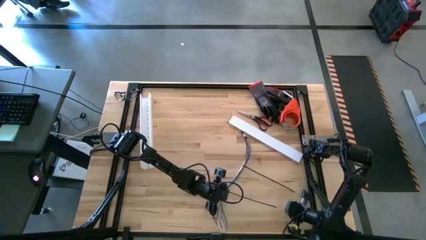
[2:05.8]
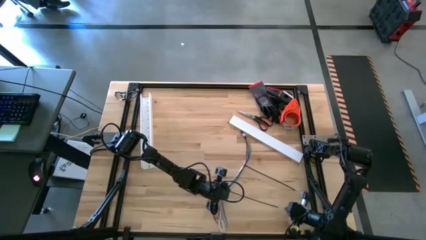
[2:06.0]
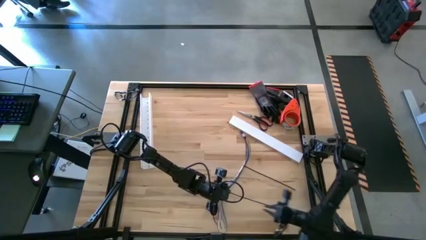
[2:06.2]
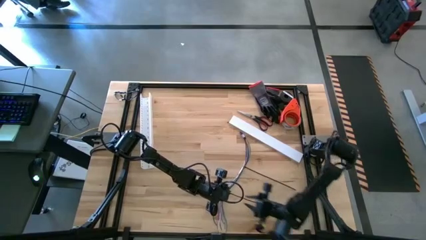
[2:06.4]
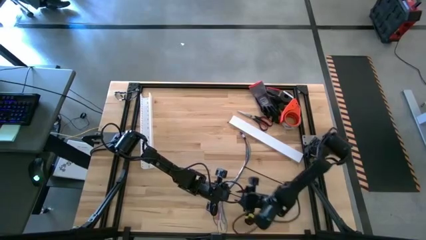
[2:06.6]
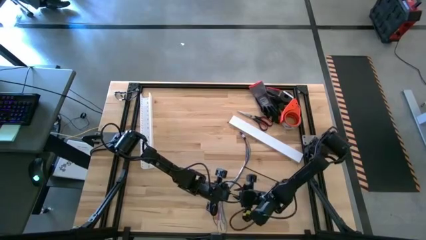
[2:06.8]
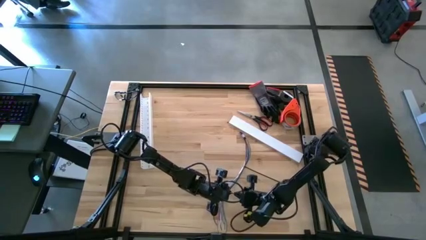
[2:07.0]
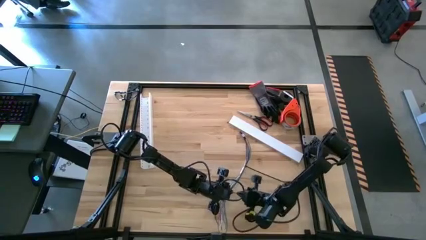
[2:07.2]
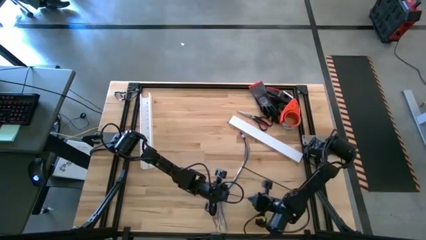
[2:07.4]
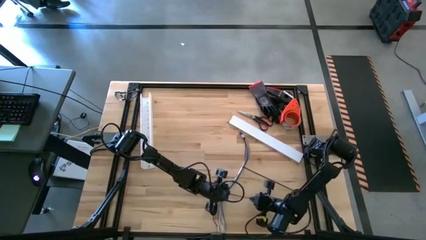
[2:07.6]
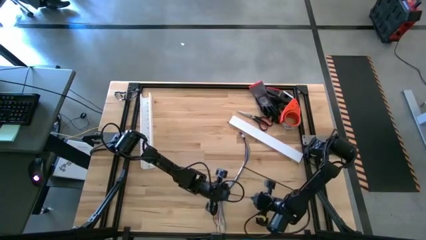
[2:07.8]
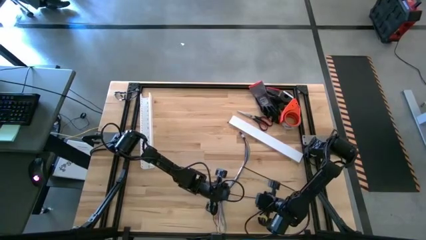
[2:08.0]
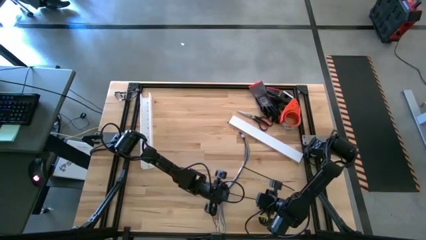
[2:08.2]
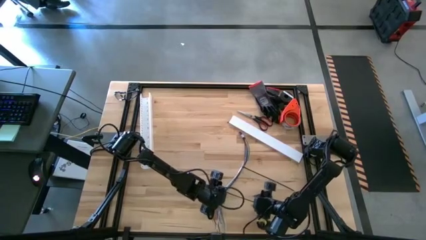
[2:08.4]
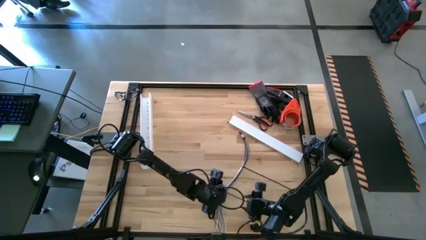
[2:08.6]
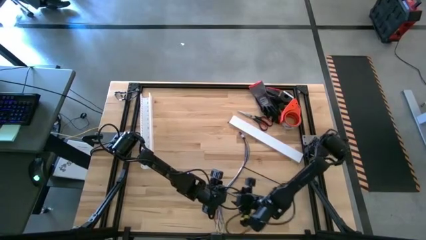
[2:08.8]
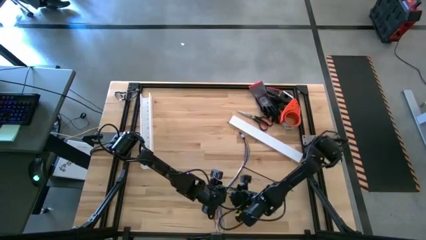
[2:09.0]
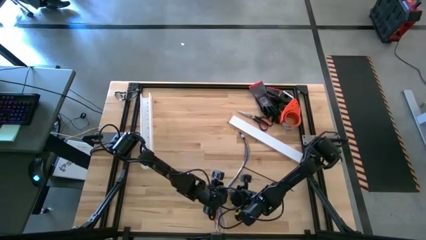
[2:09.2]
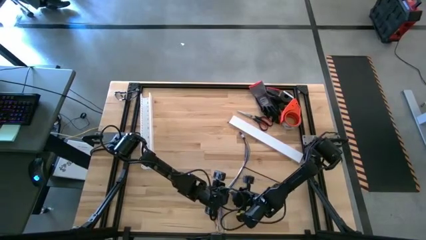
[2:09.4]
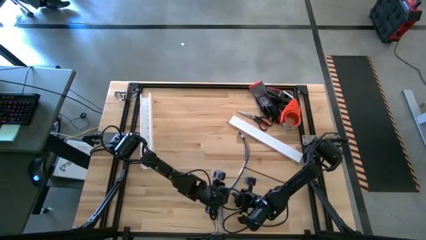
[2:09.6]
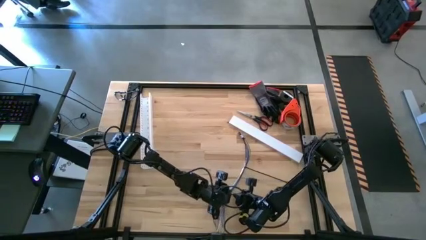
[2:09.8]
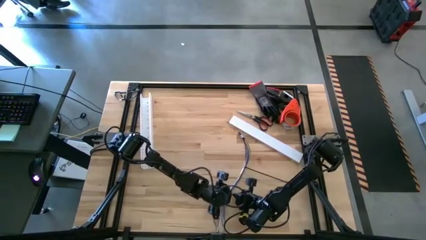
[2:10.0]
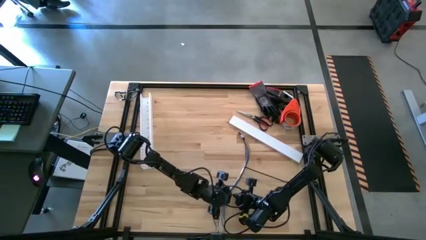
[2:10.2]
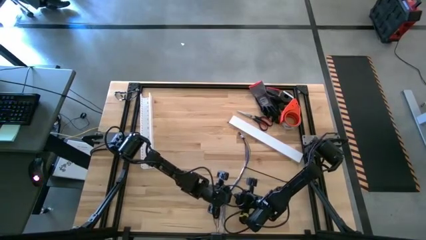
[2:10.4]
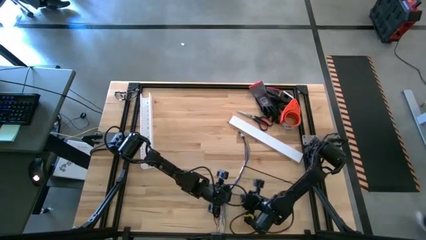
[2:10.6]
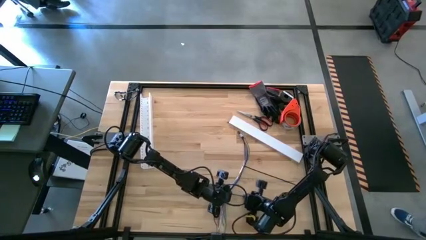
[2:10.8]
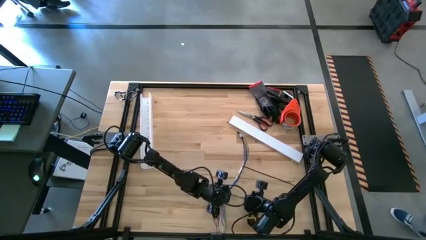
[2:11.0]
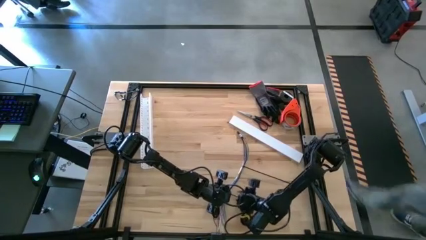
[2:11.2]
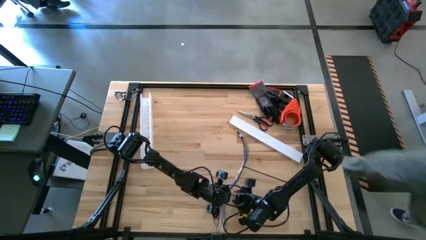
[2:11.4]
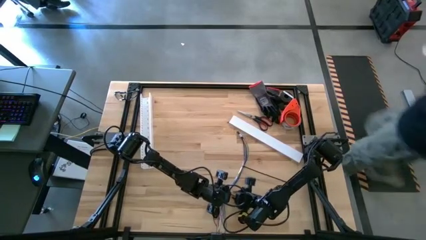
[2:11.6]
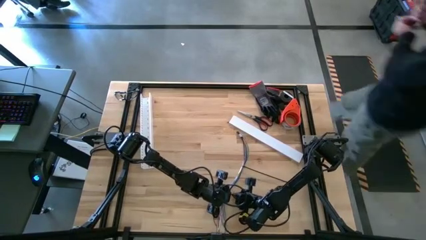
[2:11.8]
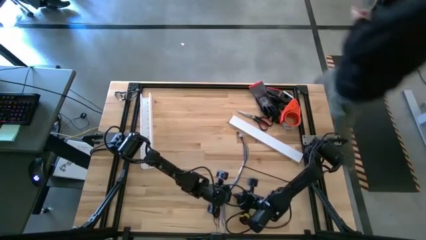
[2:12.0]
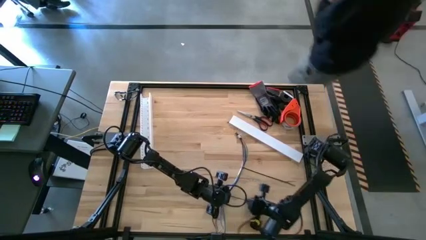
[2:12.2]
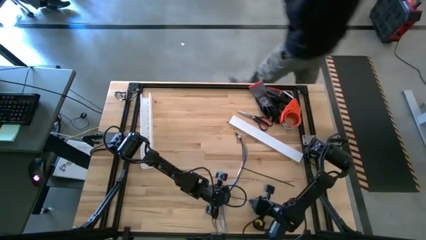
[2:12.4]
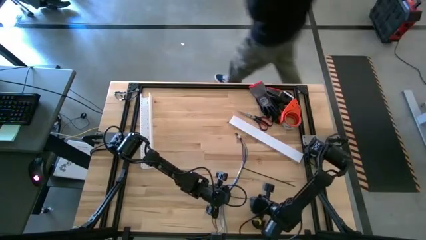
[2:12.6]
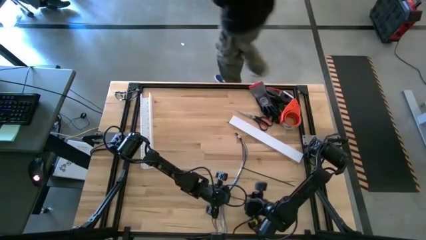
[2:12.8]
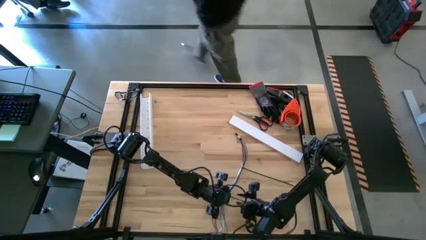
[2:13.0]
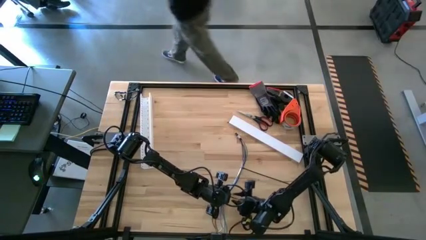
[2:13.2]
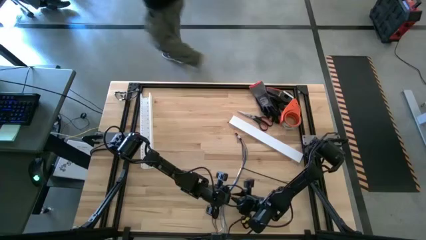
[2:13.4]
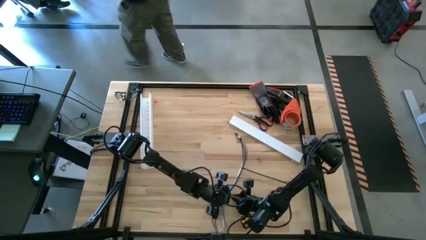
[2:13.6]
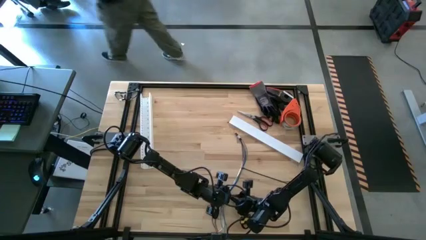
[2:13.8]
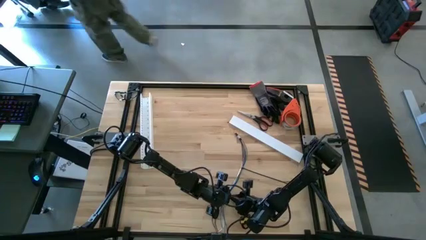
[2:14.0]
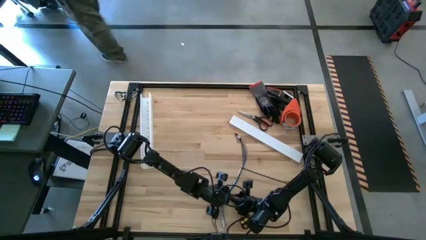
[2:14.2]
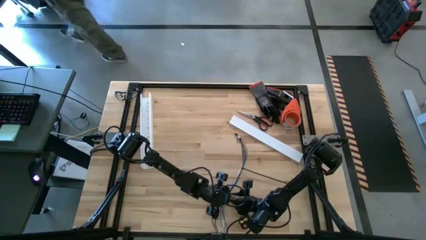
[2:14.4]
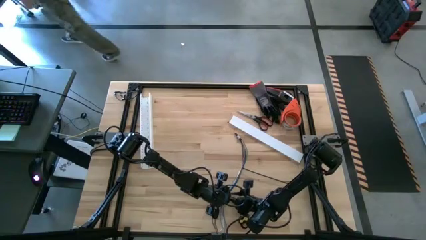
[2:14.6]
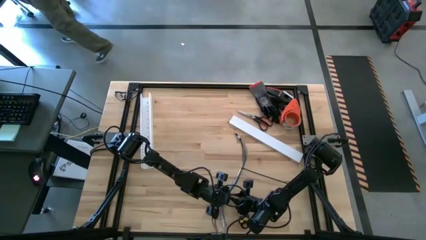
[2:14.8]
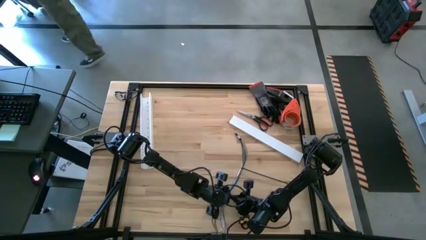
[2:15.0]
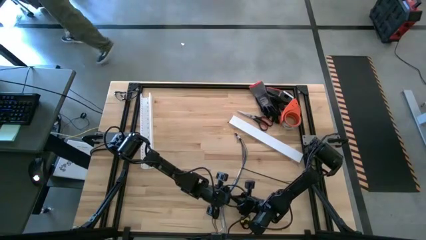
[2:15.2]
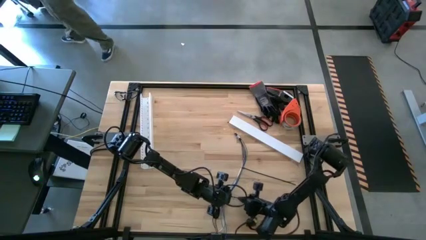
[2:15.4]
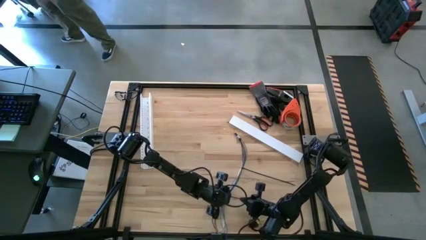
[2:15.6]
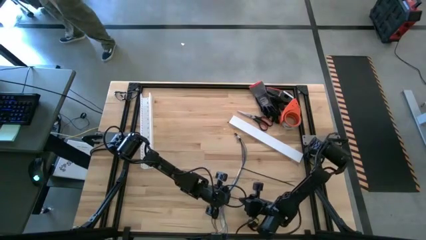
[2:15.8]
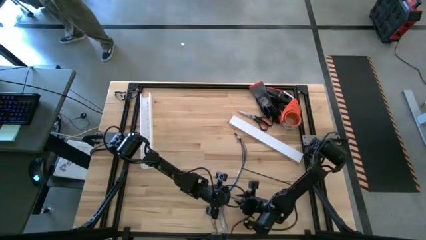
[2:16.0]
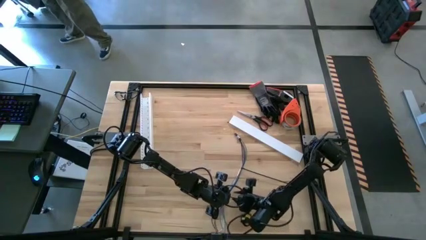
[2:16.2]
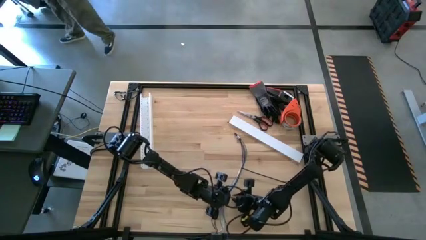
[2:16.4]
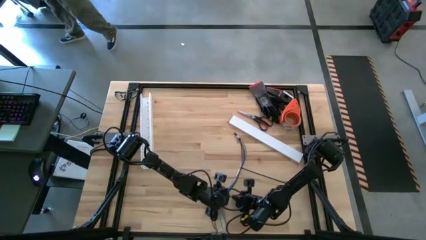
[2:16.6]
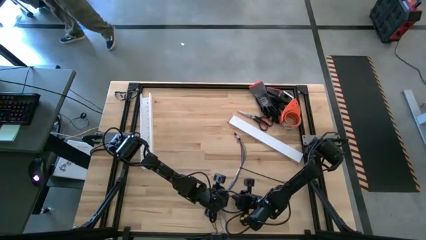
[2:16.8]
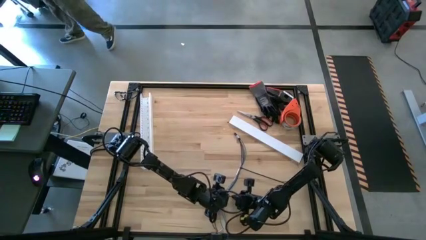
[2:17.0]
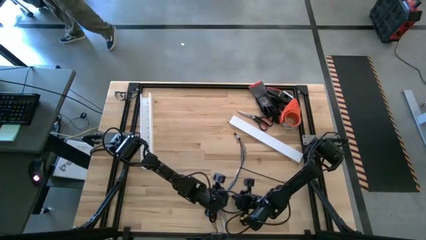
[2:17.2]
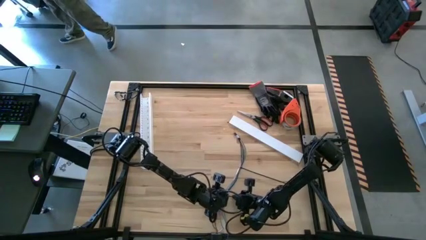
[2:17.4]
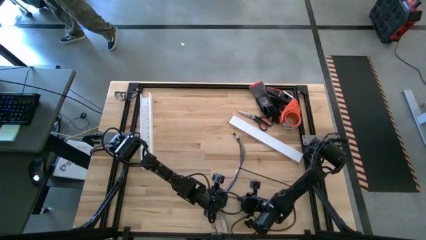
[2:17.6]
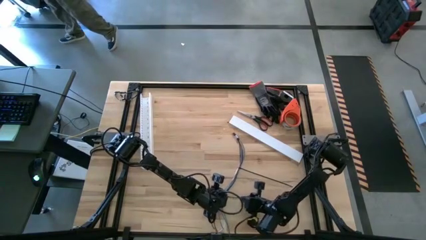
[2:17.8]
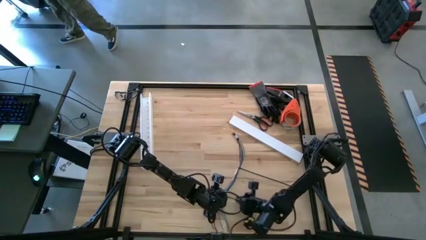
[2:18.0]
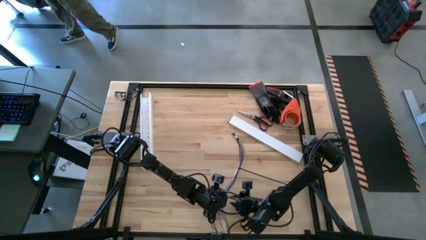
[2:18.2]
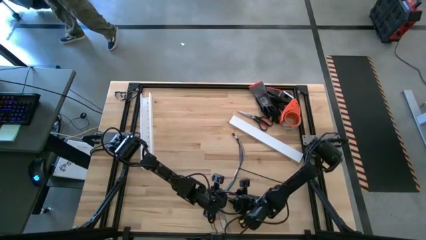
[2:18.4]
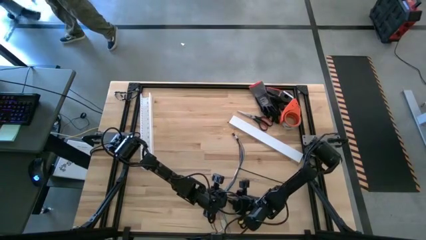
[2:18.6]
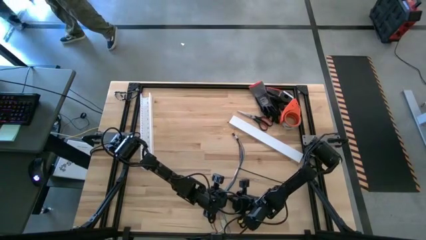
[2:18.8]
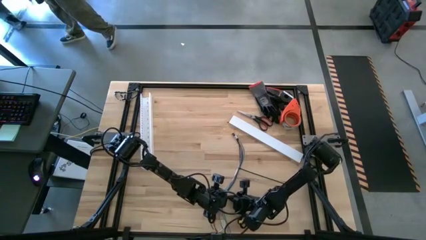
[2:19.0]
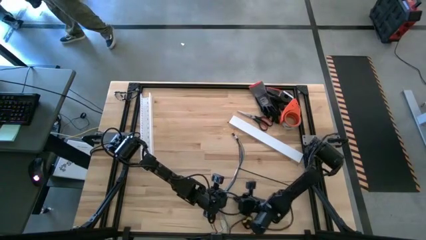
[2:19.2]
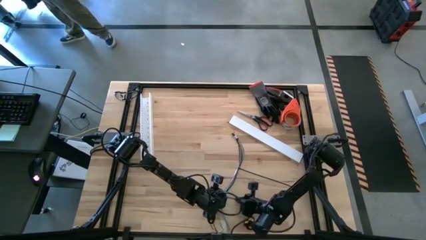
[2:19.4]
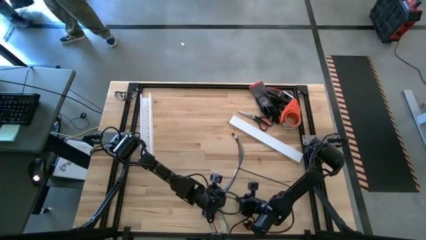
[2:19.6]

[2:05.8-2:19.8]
Task: Ziptie cables
Wrap the zip tie on the cable
